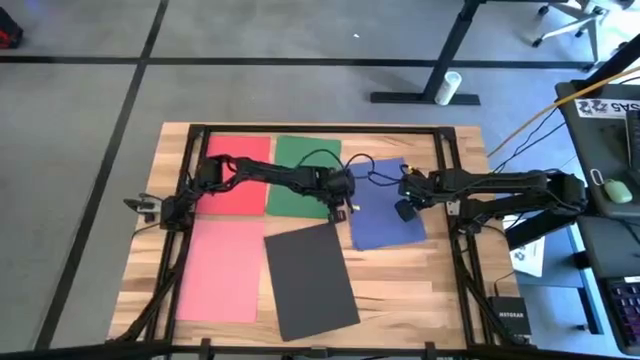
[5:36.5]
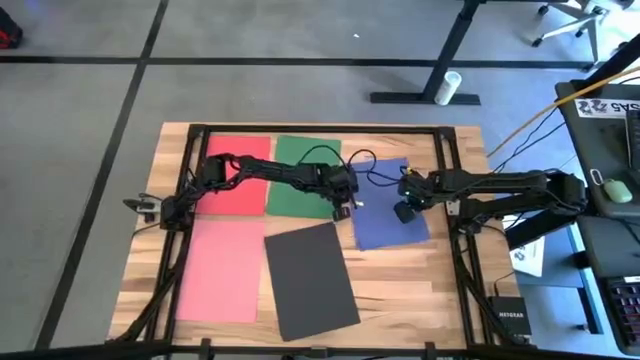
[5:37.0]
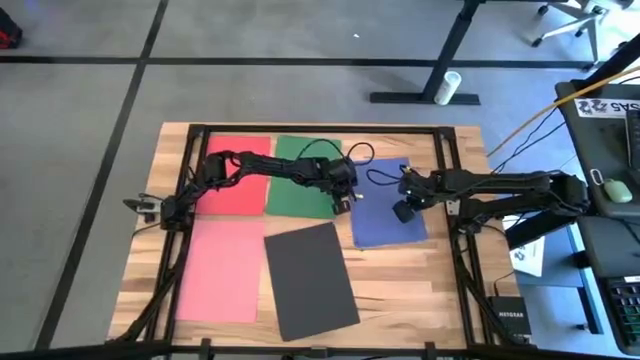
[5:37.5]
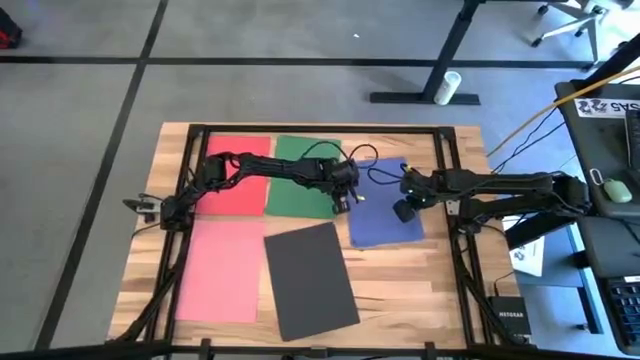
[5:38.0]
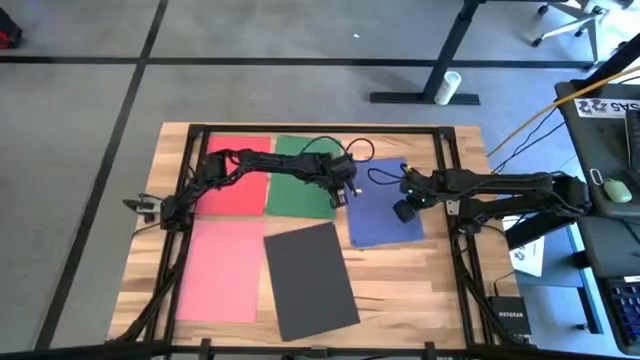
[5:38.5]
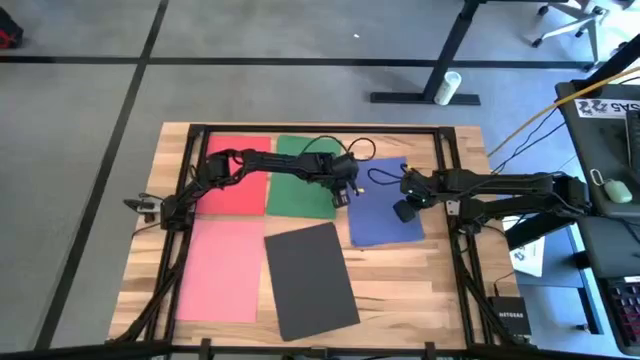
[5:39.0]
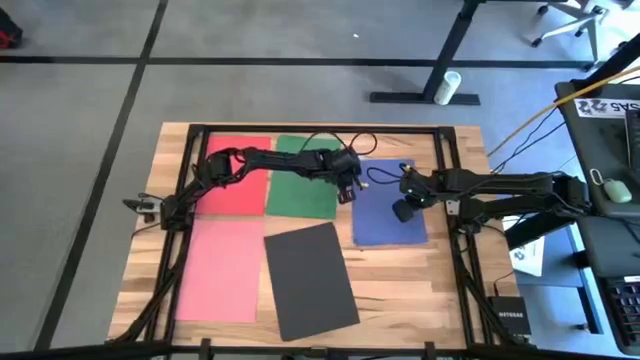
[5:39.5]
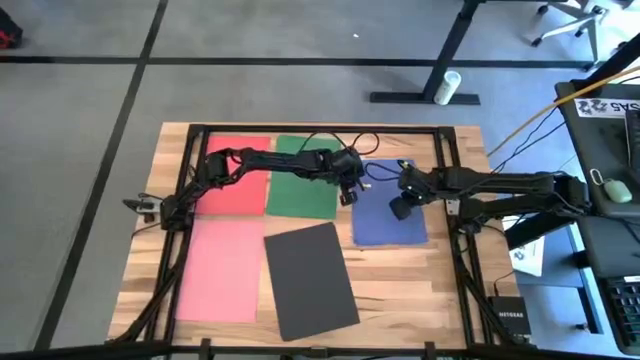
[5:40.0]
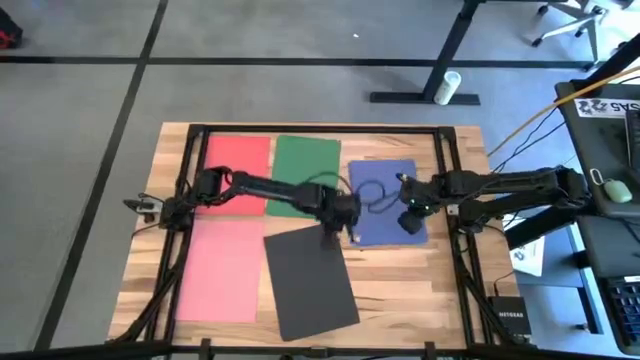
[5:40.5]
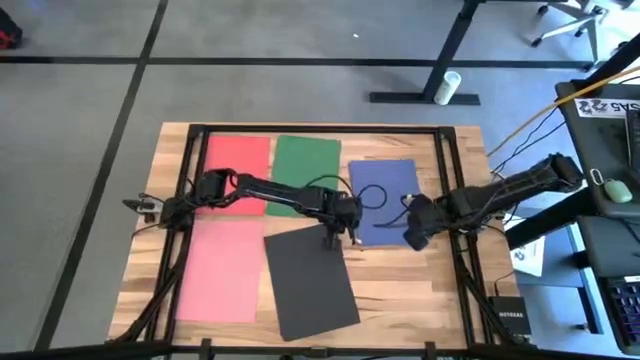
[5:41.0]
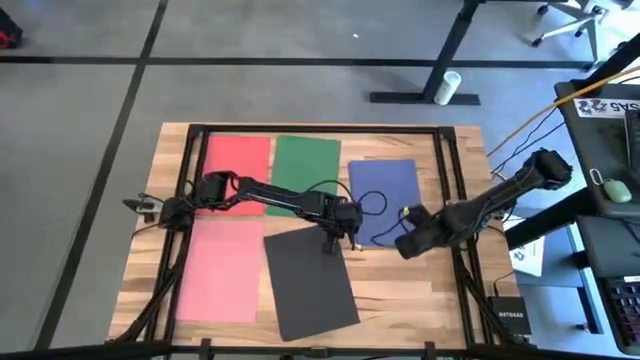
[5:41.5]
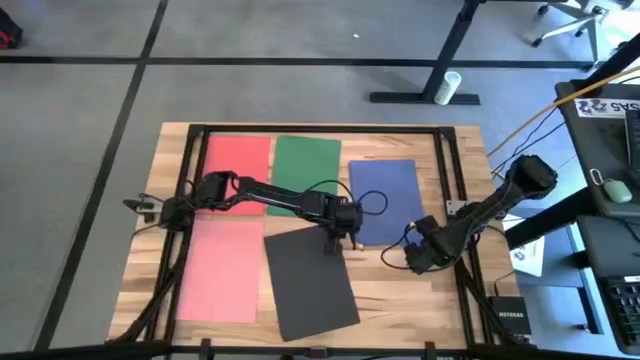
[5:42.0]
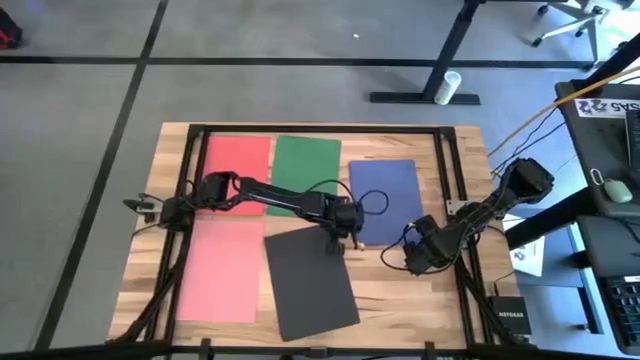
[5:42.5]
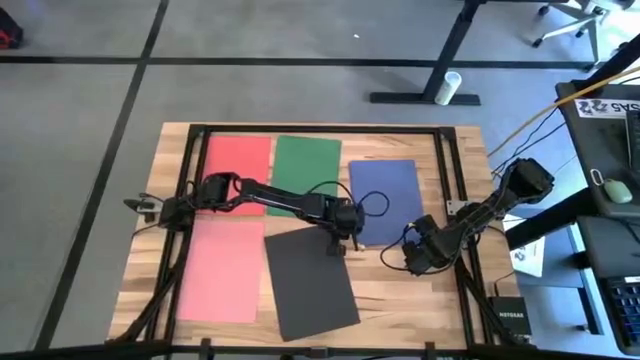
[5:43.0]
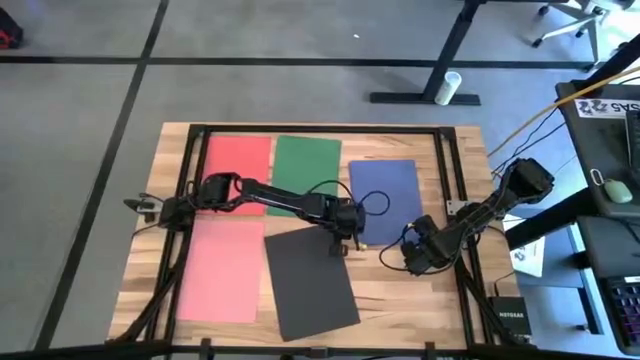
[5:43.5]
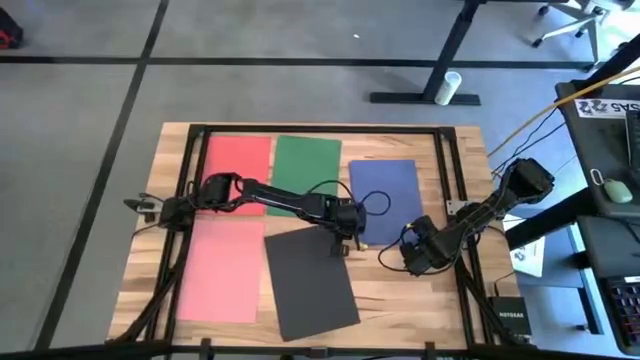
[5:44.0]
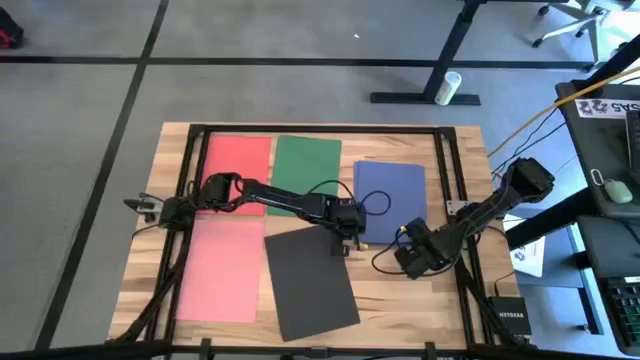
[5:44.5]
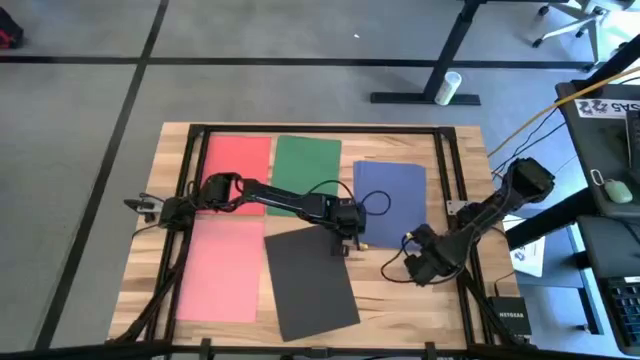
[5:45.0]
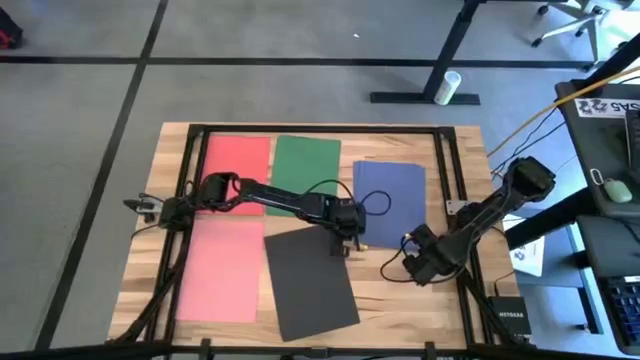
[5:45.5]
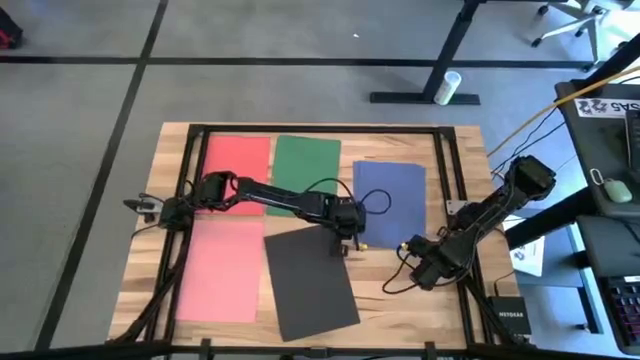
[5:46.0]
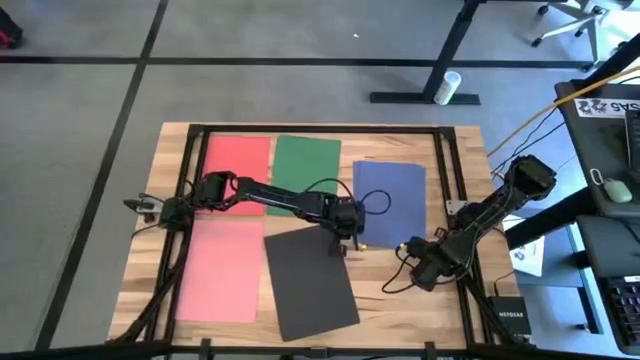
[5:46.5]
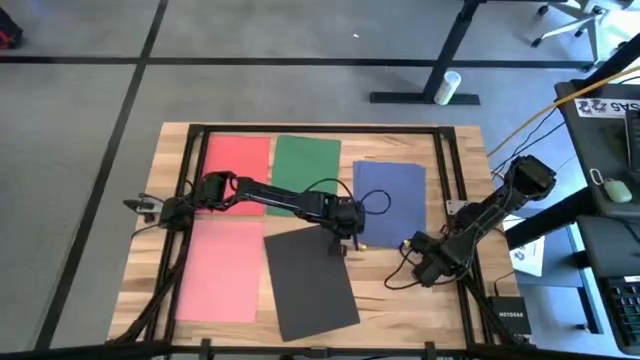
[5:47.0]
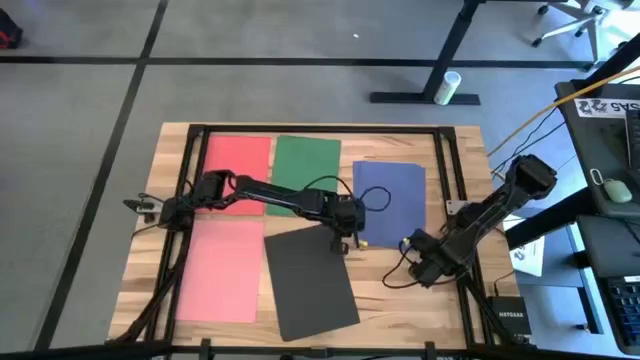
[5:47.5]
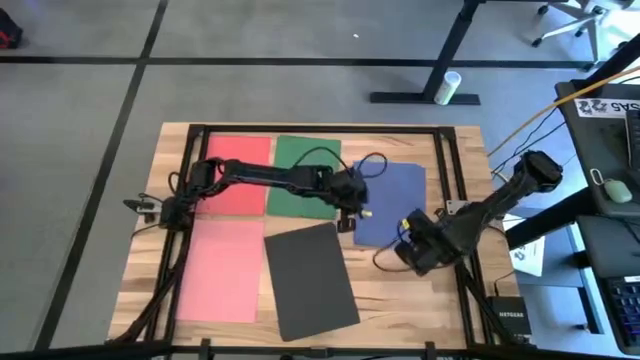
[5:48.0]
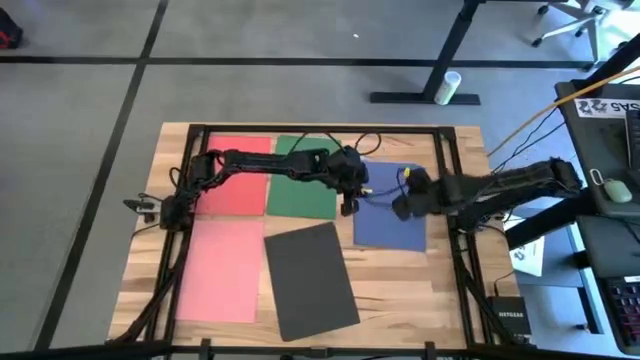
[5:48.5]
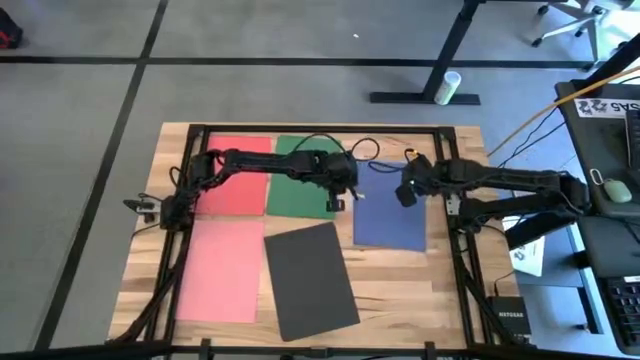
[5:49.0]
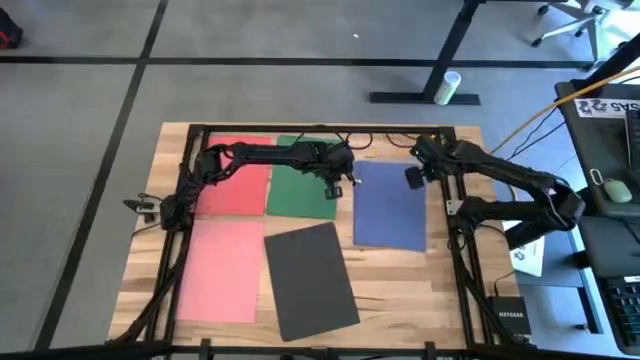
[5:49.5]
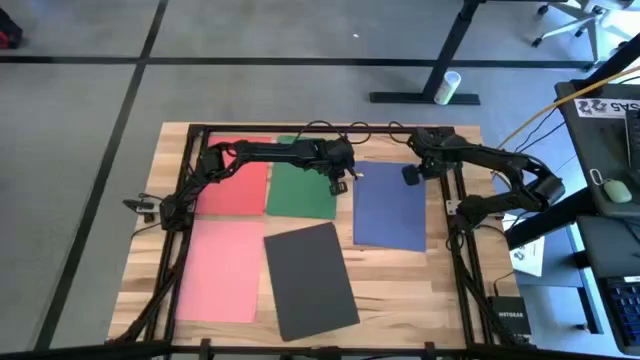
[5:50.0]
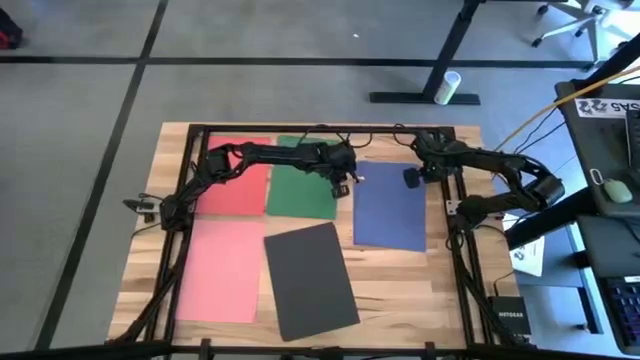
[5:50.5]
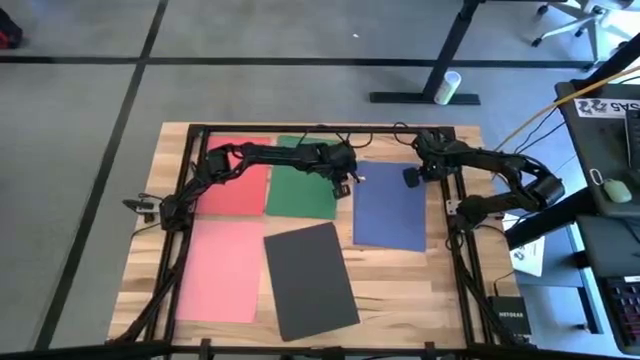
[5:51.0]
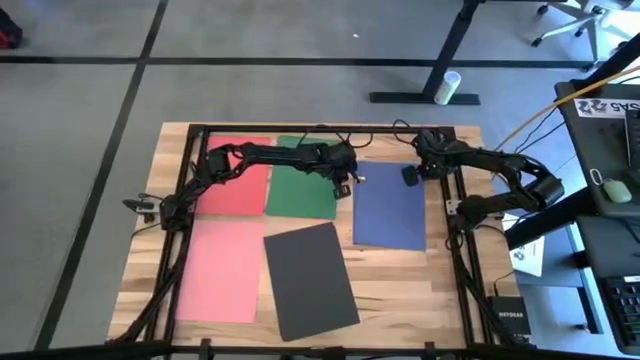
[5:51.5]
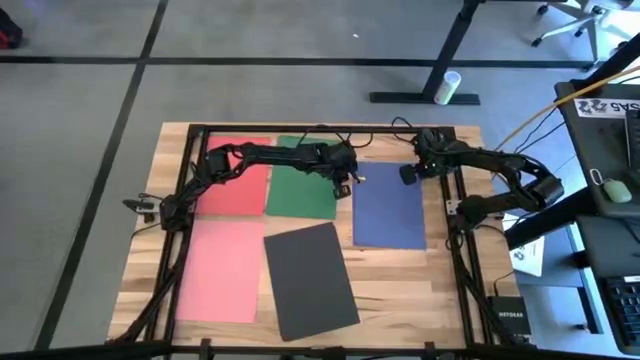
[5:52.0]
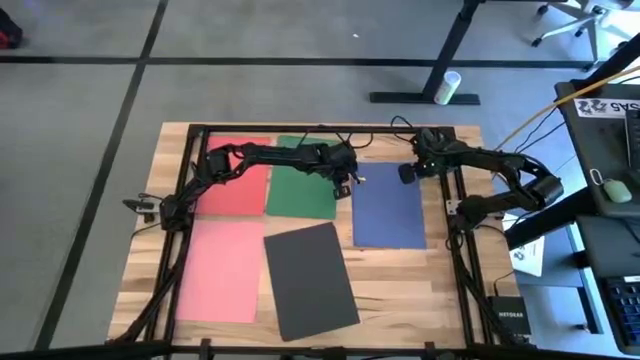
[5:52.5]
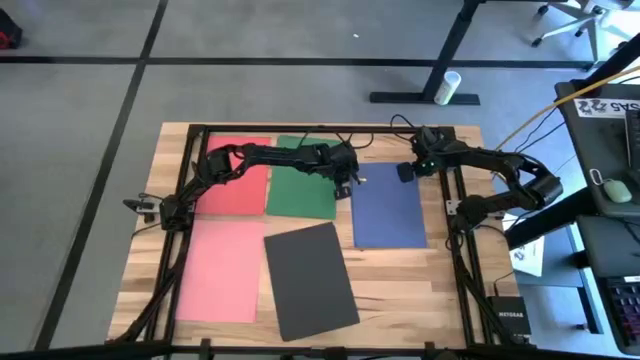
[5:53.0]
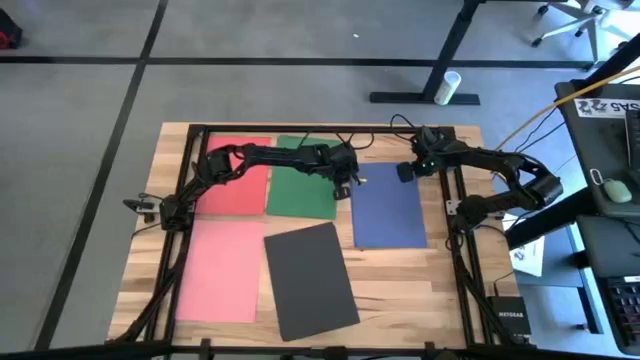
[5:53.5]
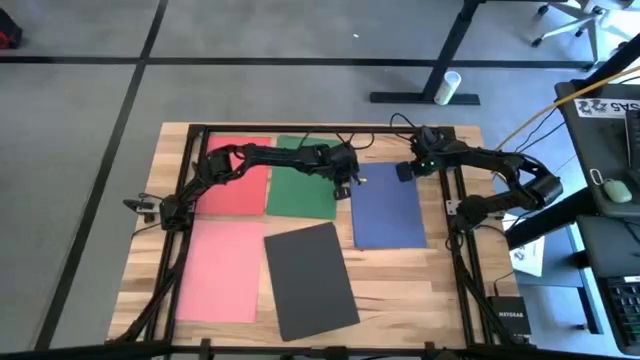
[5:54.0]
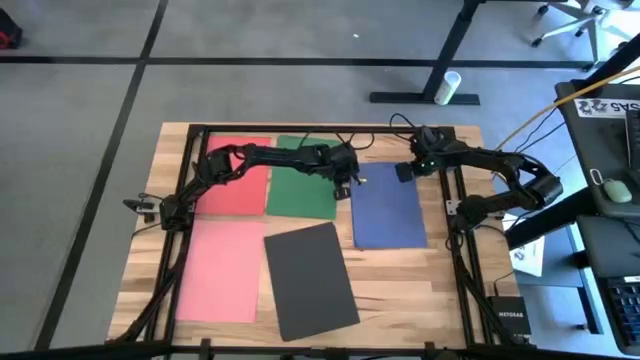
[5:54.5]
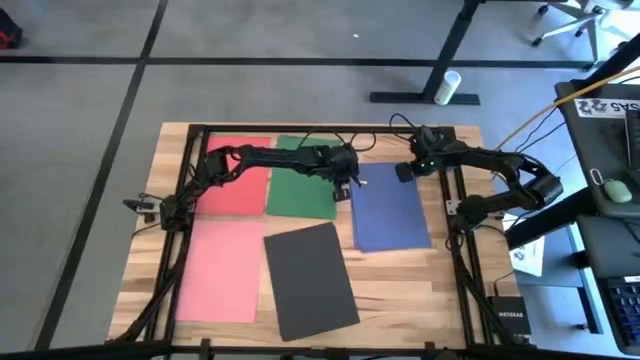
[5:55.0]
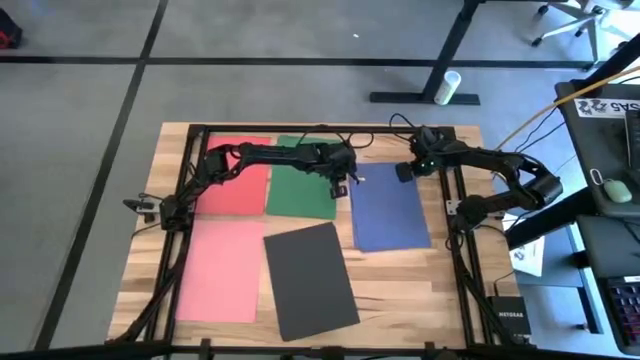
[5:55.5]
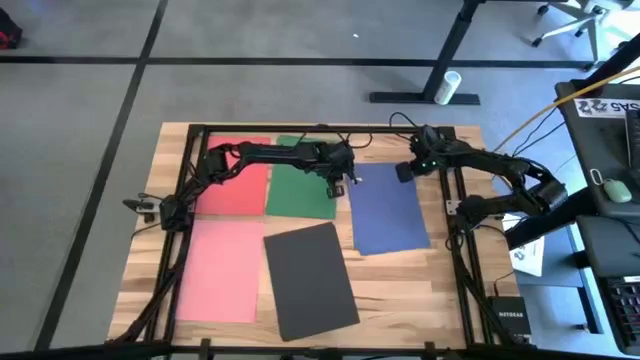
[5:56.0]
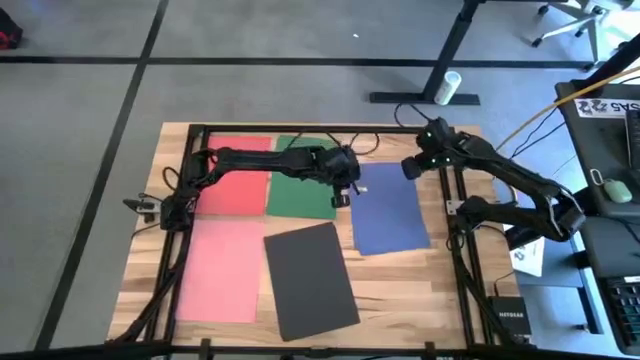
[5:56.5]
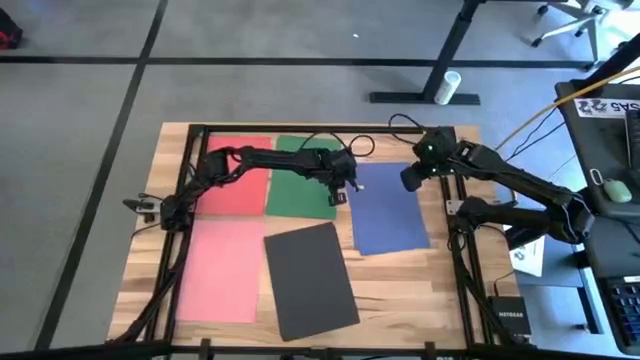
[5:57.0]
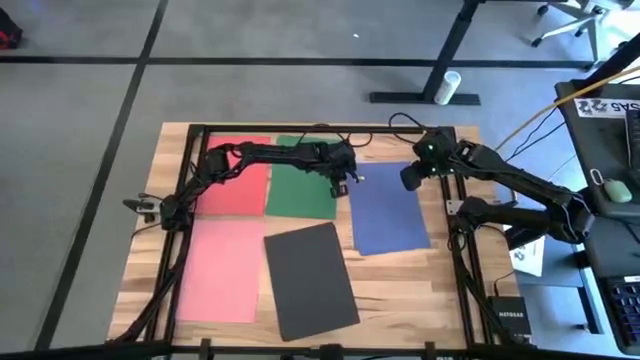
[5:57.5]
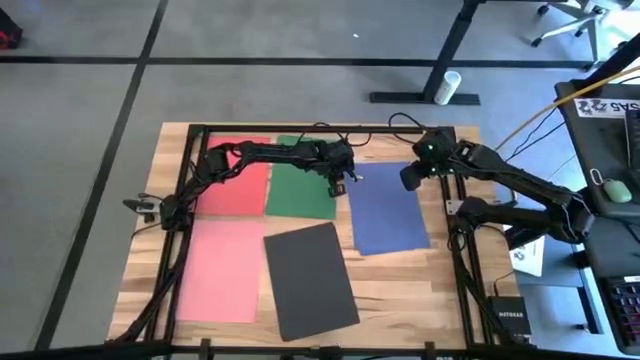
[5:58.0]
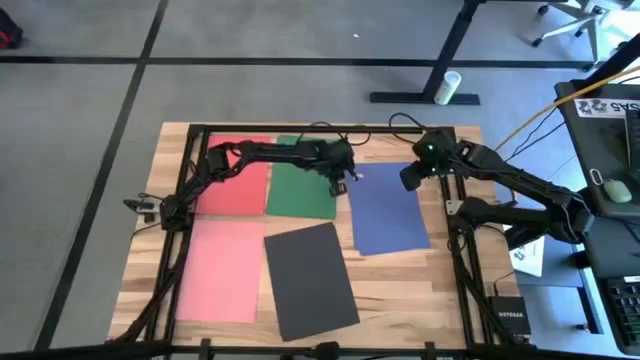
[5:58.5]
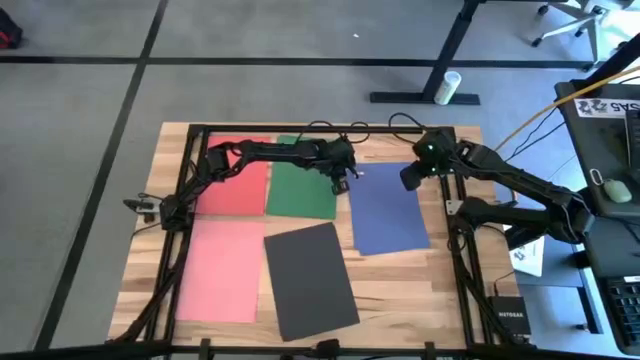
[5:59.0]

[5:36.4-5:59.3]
Task: Organize paper
Stack the violet paper on top of the violet papers
